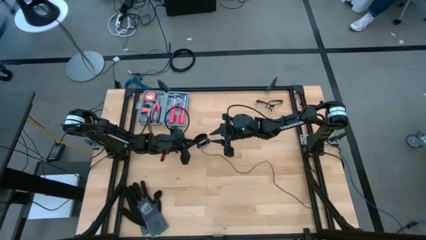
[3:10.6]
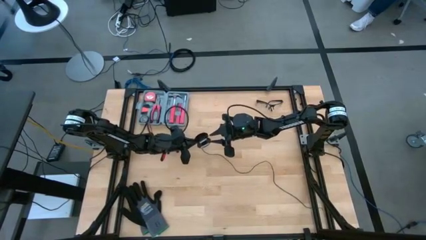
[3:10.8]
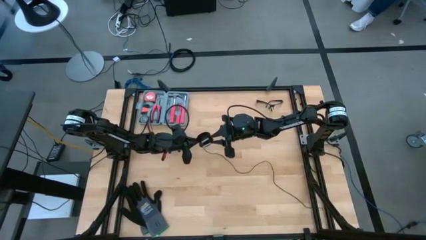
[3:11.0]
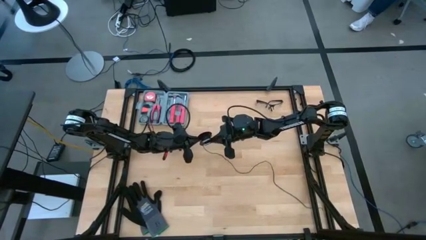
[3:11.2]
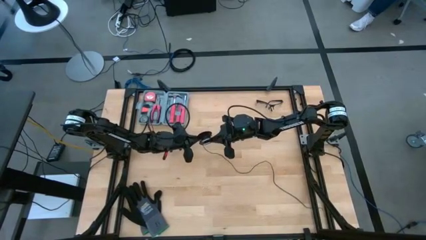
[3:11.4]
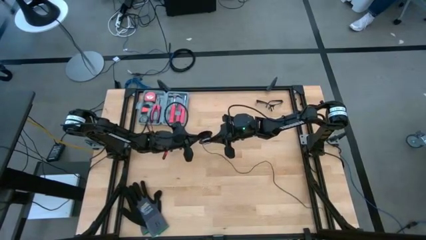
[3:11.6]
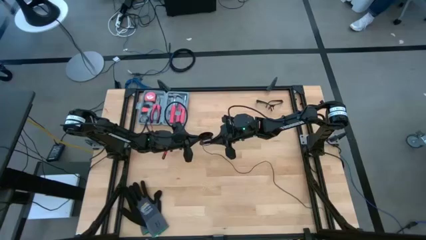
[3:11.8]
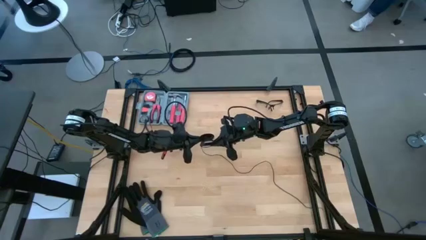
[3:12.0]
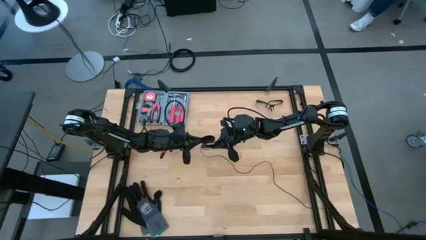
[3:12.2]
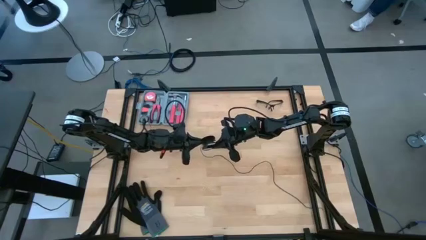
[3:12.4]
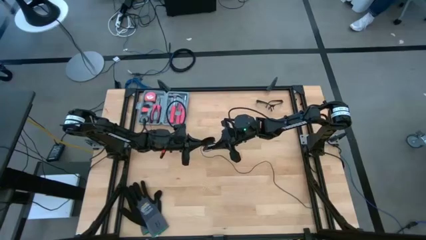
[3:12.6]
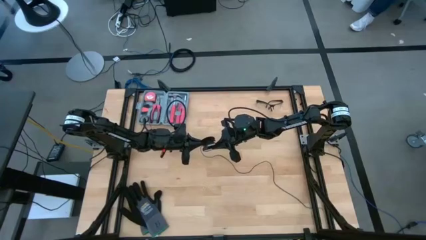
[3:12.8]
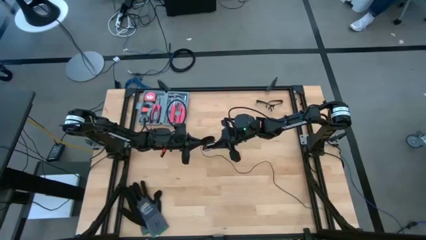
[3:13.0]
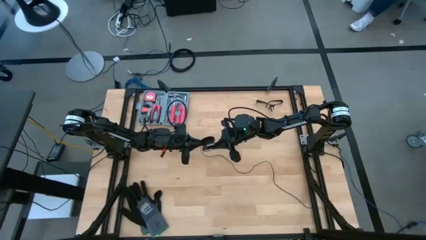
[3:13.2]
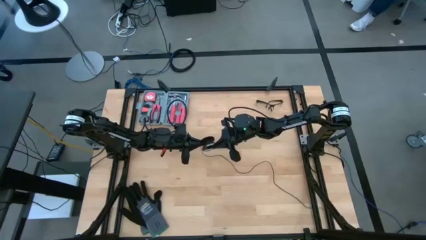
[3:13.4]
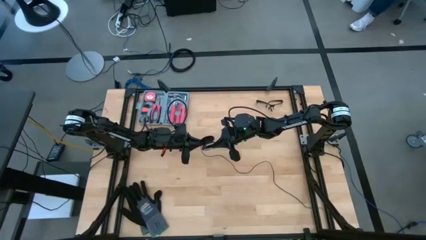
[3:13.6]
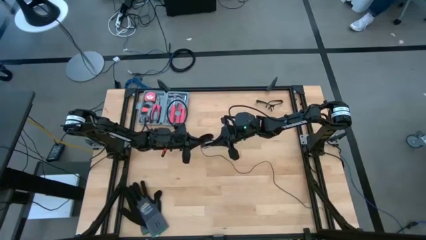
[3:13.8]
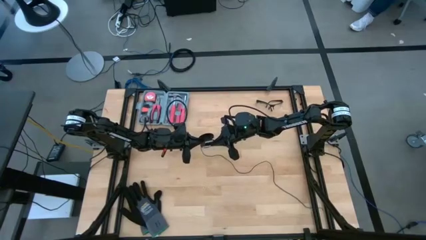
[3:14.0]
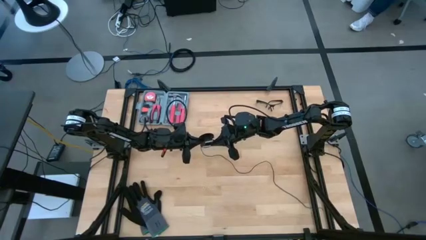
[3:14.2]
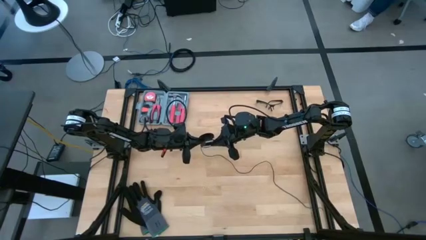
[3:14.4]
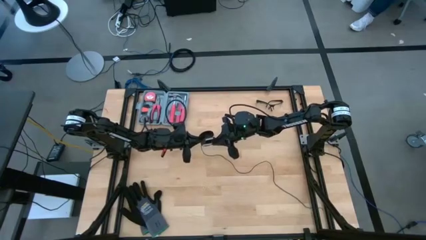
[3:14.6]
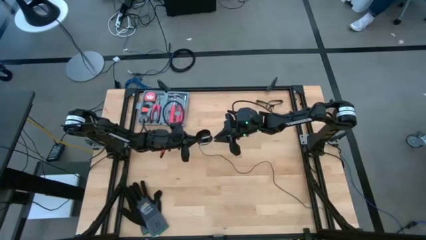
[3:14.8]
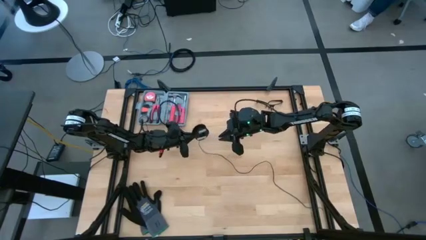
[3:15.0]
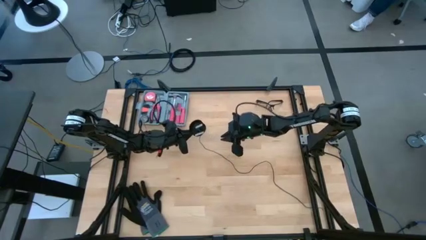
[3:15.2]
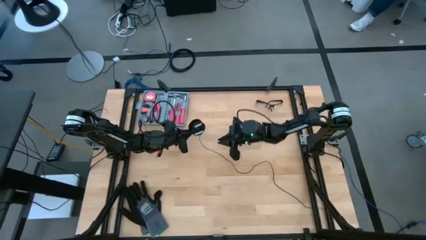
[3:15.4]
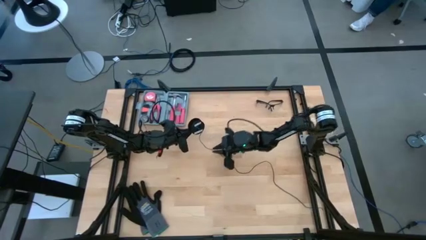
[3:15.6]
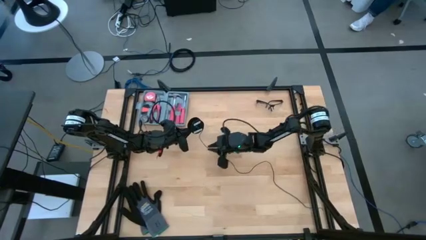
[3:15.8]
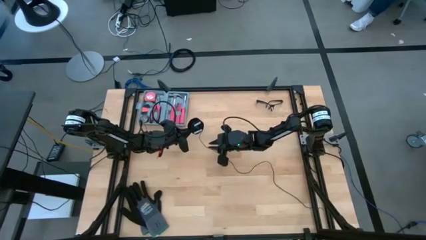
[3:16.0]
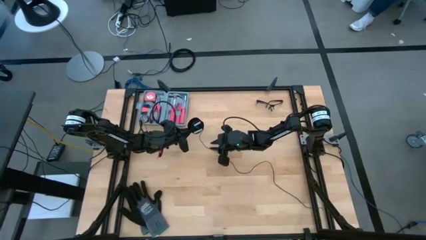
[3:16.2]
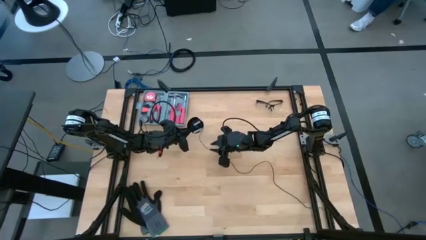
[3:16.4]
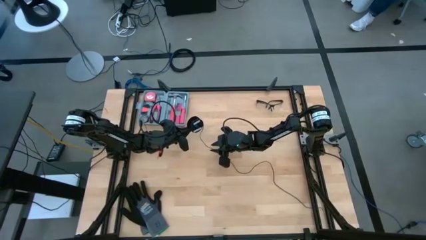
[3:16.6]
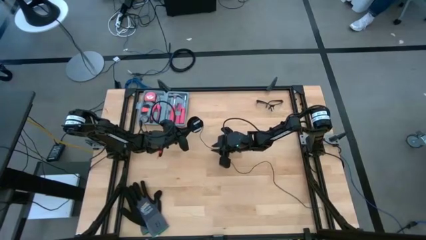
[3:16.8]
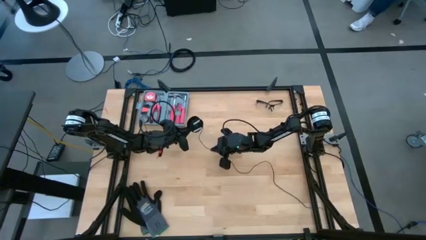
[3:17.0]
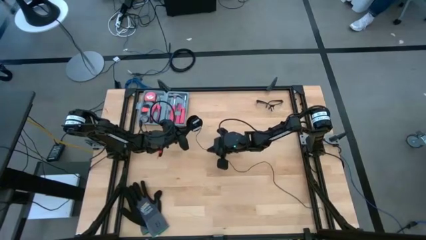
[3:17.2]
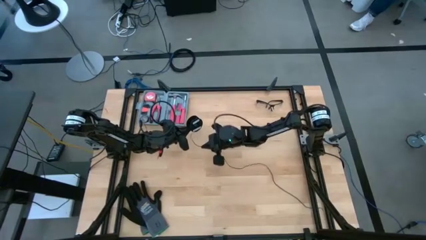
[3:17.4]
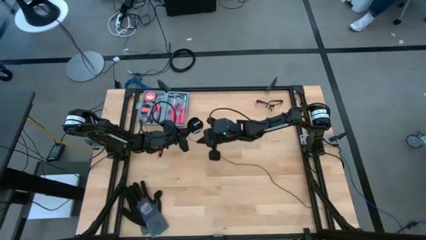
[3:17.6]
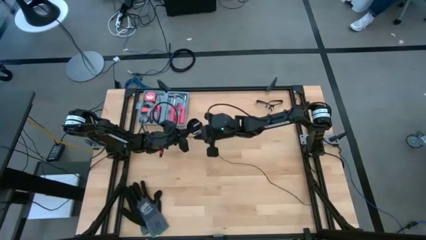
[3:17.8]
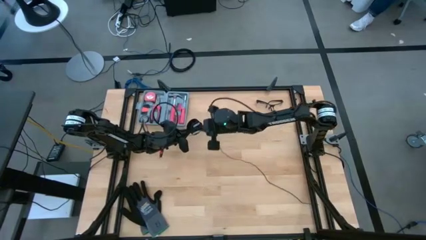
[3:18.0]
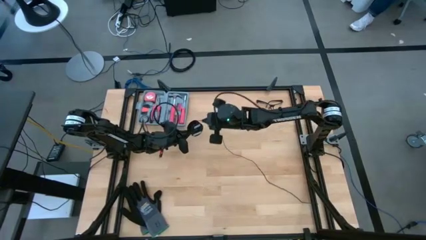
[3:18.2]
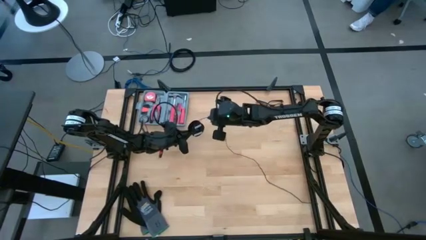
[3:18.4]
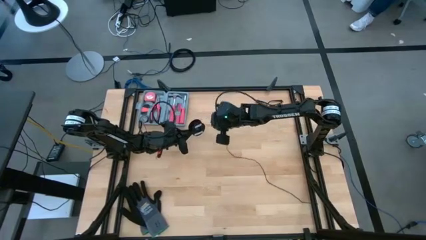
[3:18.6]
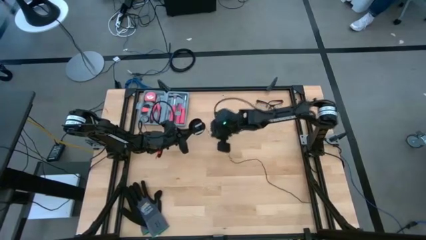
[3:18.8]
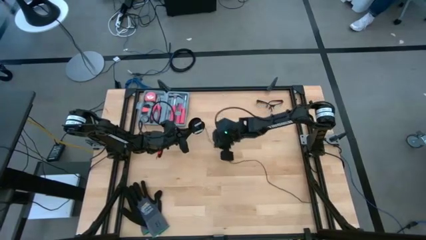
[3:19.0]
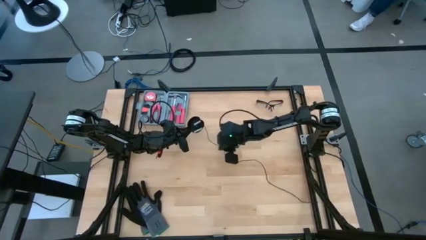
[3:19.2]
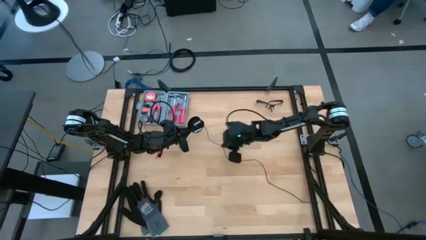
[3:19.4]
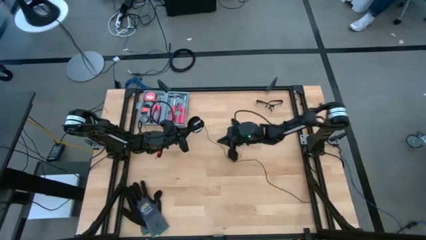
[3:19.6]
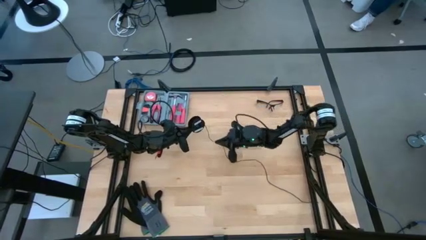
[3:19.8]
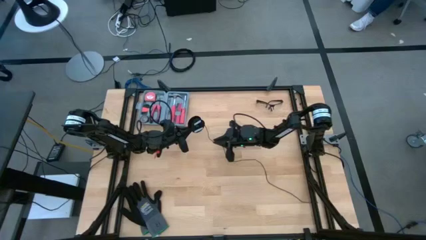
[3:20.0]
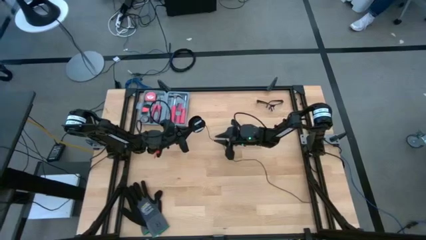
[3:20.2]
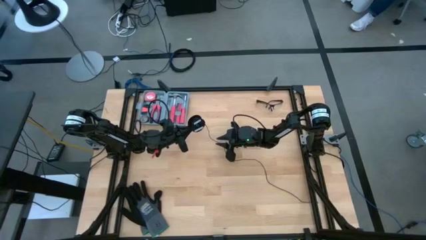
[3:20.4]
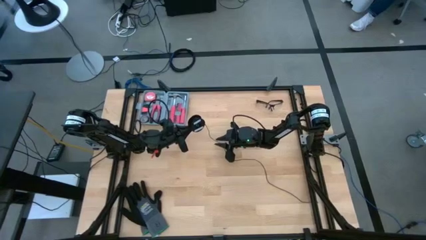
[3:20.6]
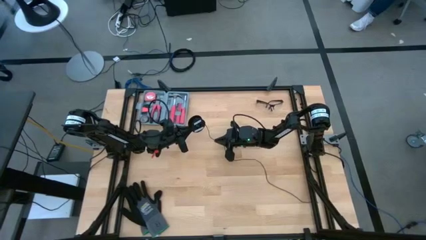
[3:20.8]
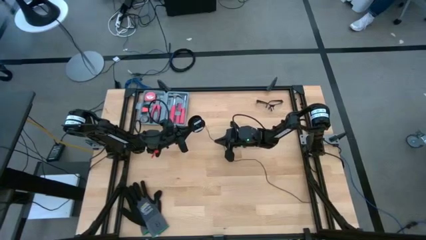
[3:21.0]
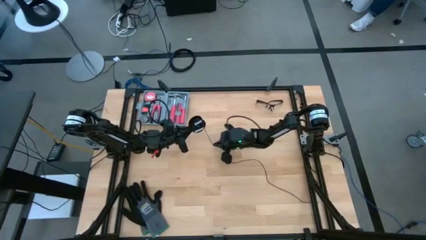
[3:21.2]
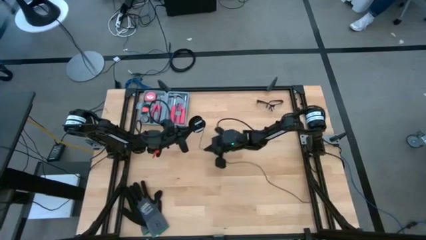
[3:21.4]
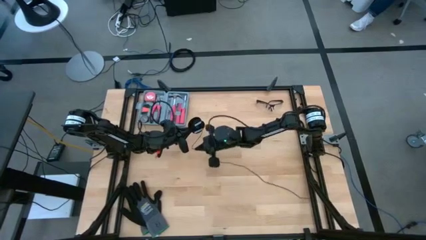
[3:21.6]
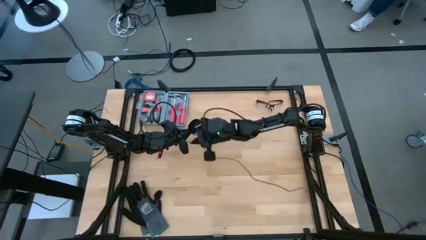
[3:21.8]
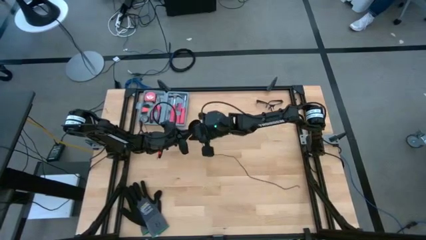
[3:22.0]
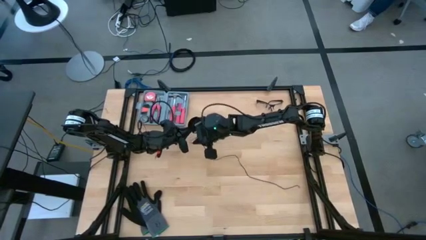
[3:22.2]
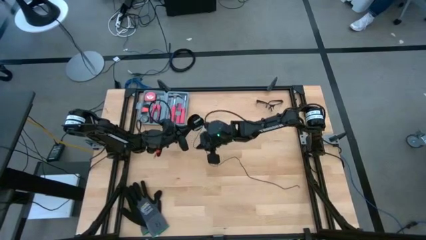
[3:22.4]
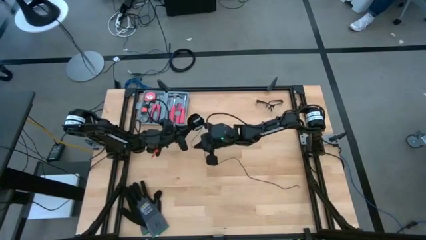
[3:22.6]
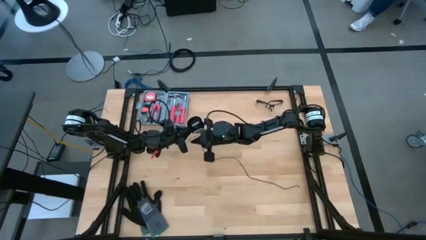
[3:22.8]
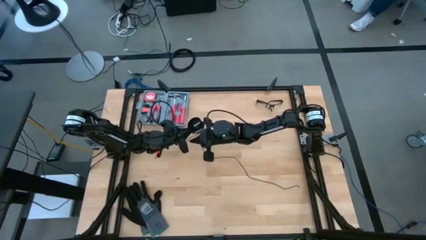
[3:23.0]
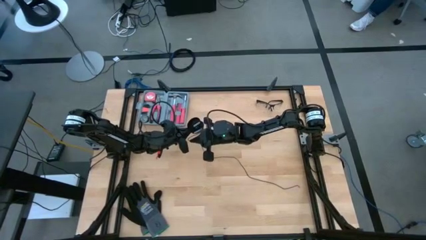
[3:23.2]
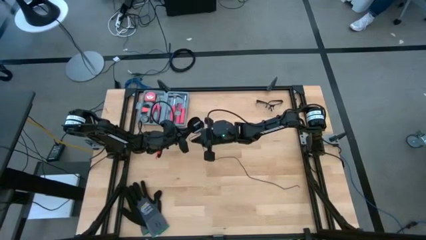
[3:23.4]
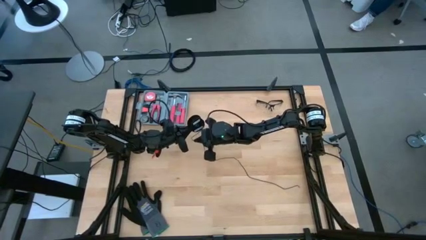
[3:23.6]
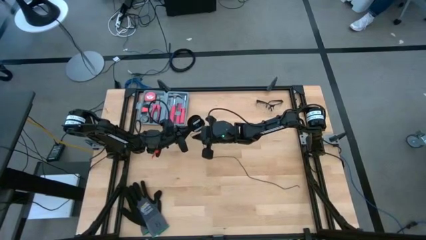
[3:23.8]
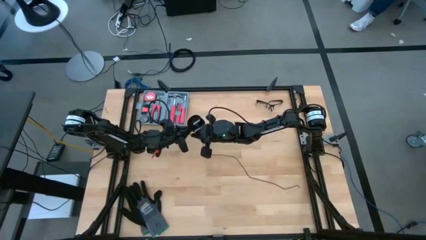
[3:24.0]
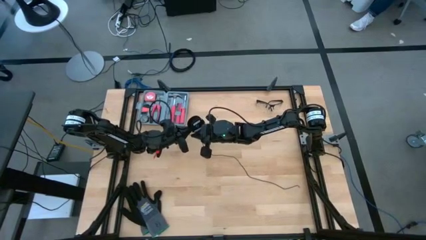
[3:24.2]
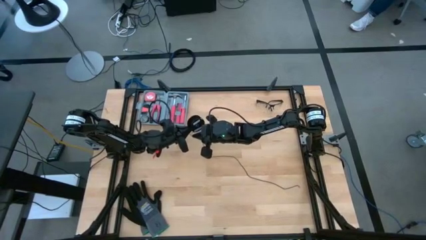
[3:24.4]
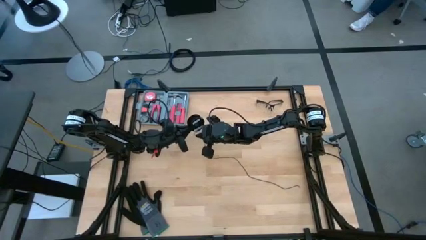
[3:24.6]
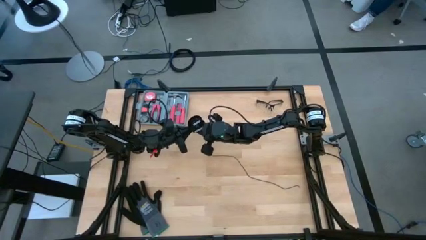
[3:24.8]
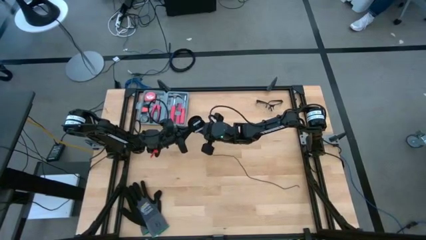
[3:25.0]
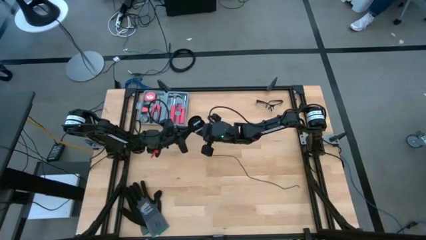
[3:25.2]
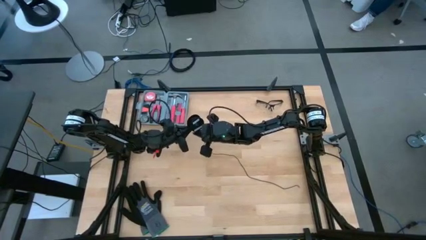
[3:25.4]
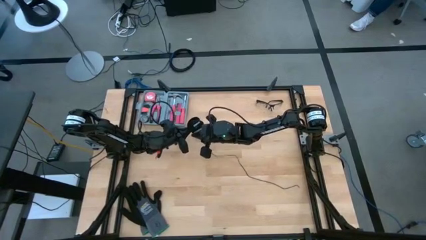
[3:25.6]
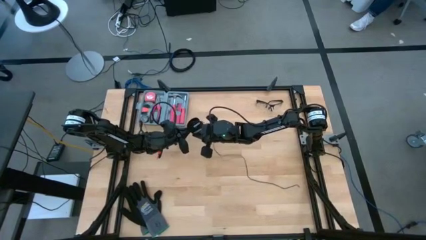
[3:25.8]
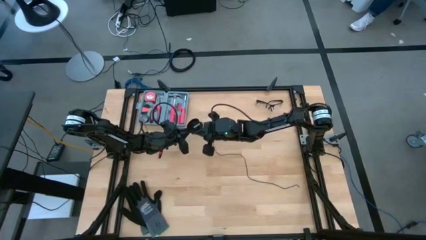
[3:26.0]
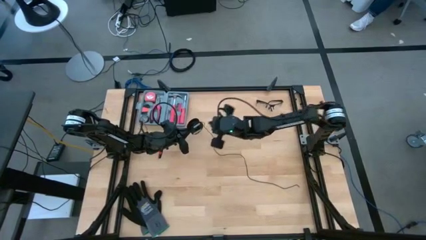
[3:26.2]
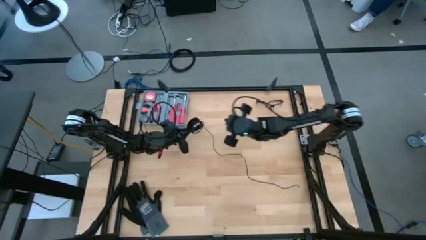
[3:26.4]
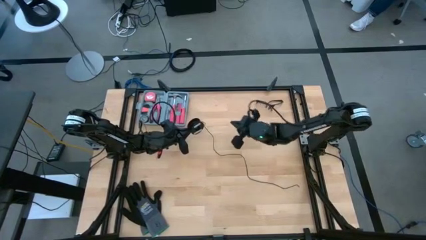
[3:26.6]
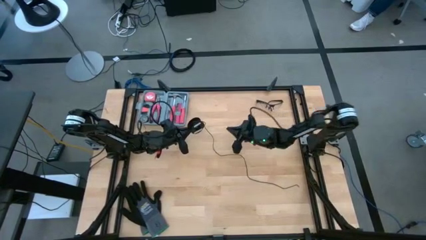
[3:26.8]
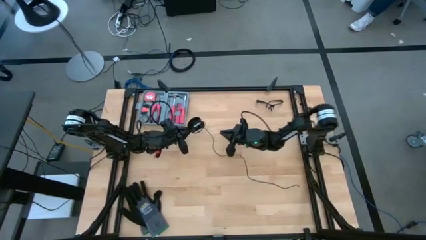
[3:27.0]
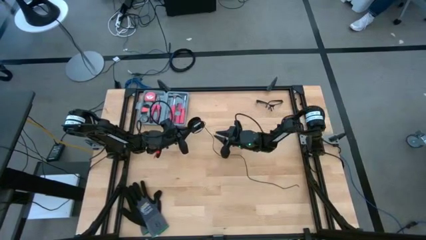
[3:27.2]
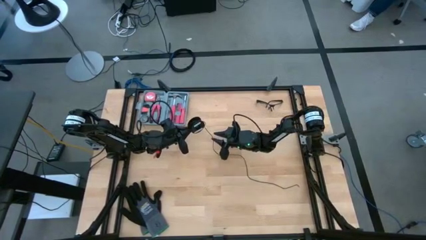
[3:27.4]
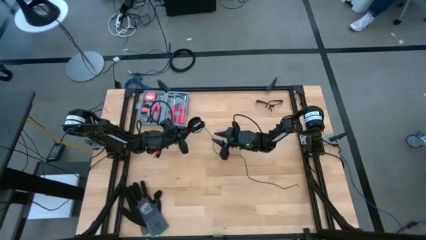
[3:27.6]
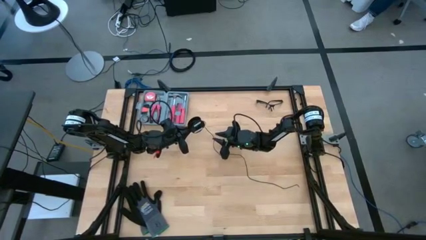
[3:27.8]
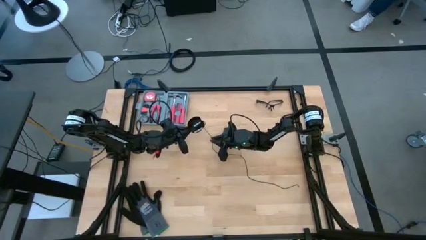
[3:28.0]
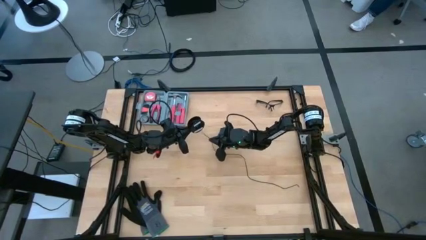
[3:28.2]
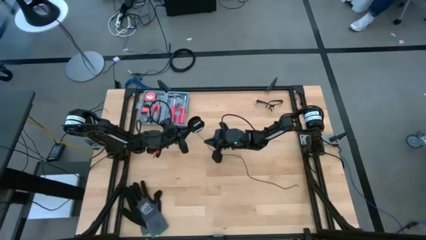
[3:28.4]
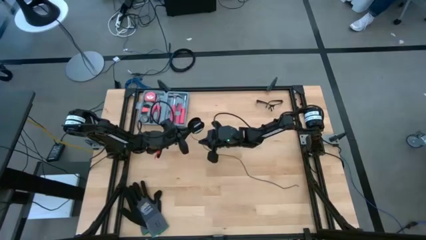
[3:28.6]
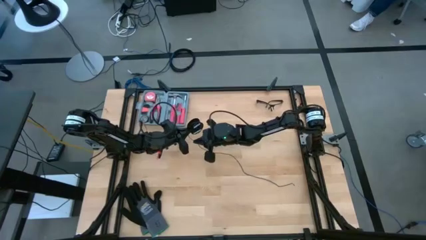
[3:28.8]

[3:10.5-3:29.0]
Task: Coil cords
Coil the black wire on the black spool
